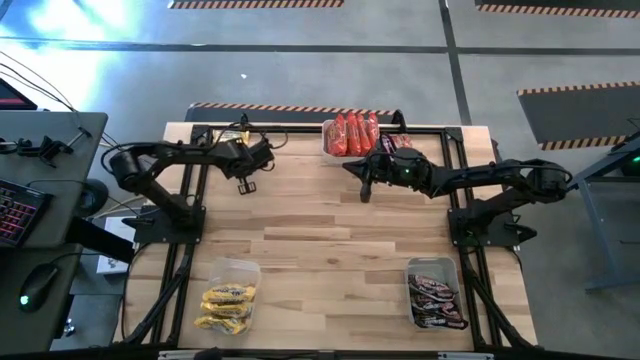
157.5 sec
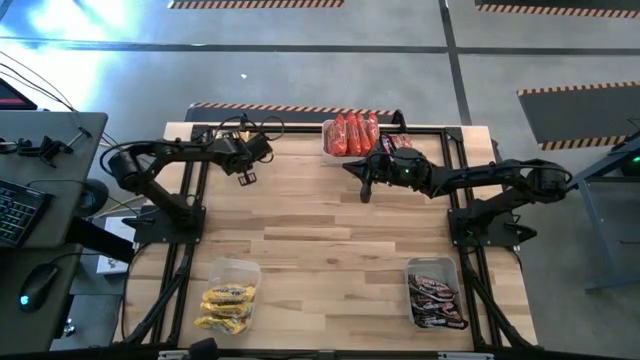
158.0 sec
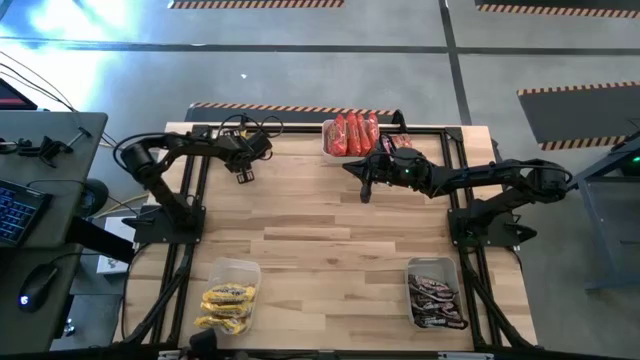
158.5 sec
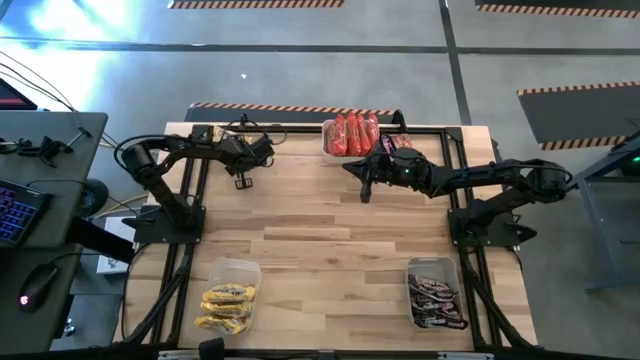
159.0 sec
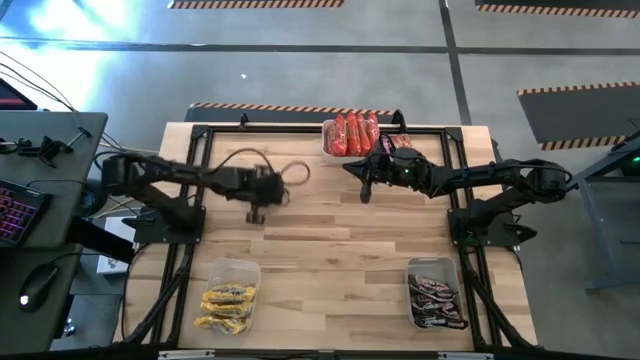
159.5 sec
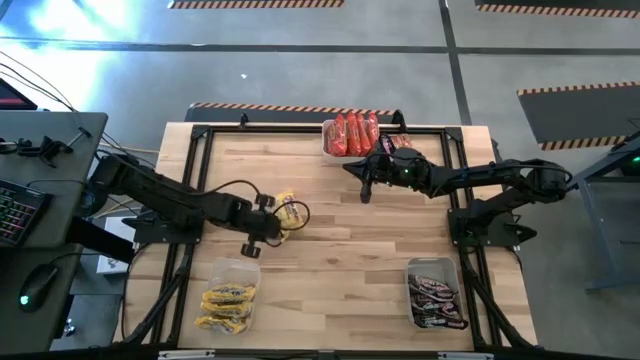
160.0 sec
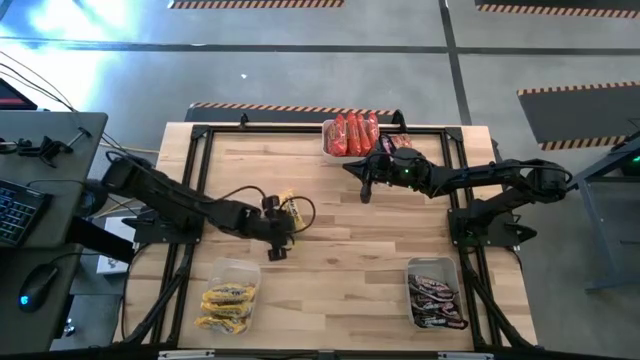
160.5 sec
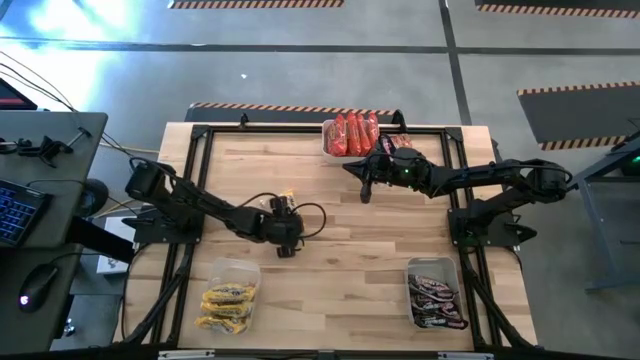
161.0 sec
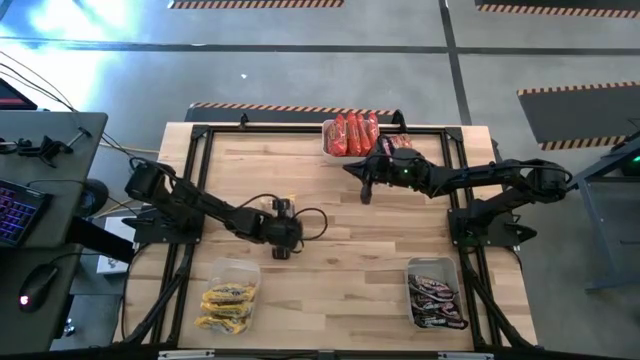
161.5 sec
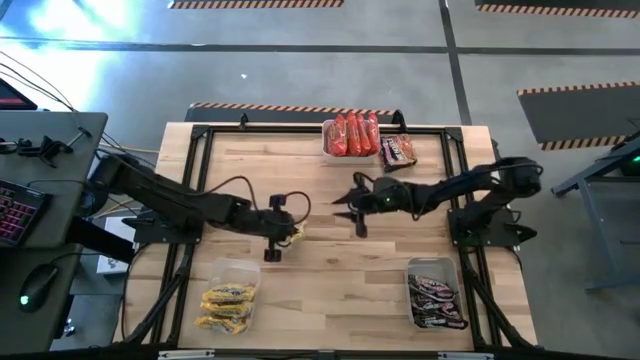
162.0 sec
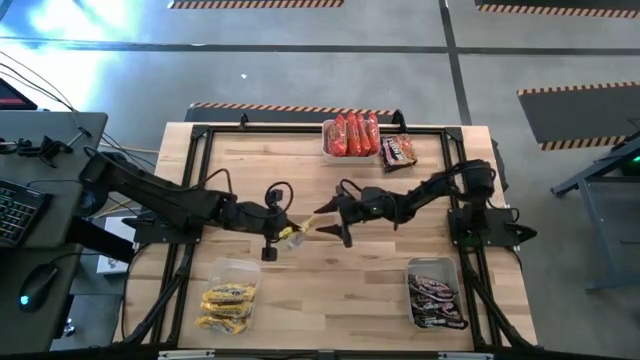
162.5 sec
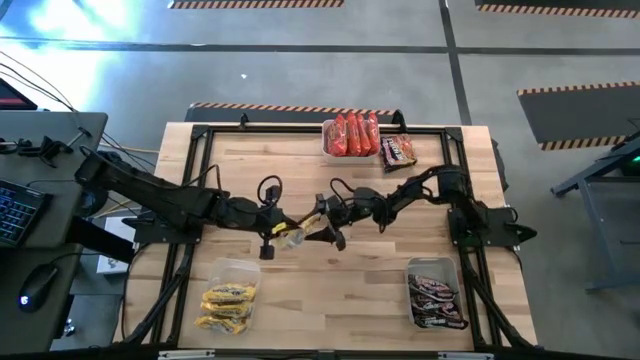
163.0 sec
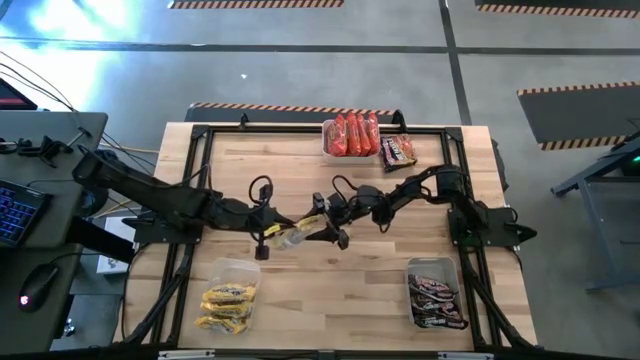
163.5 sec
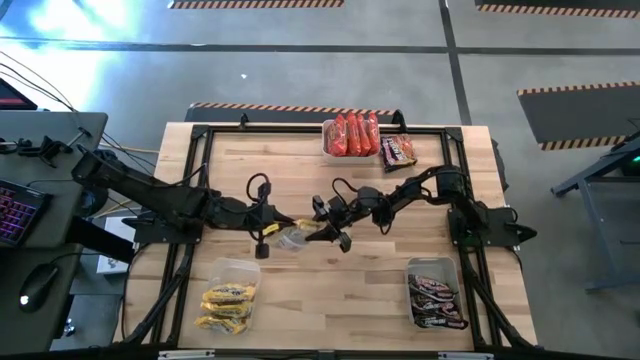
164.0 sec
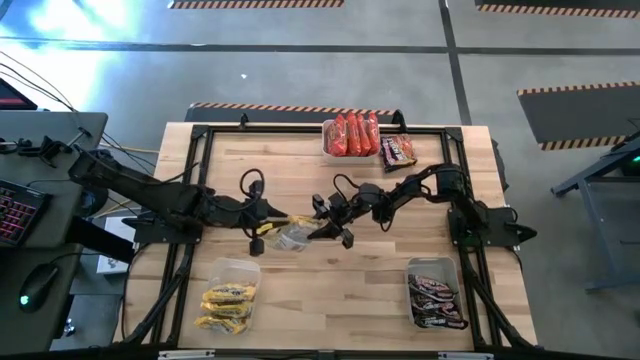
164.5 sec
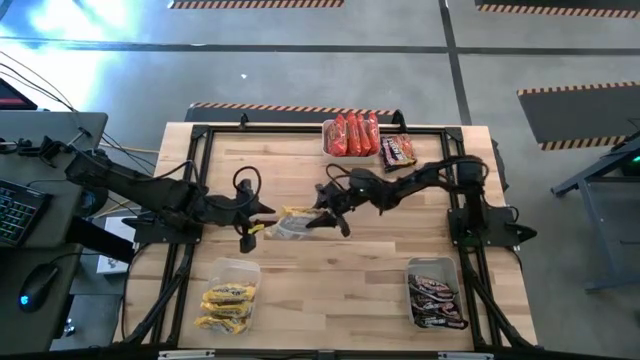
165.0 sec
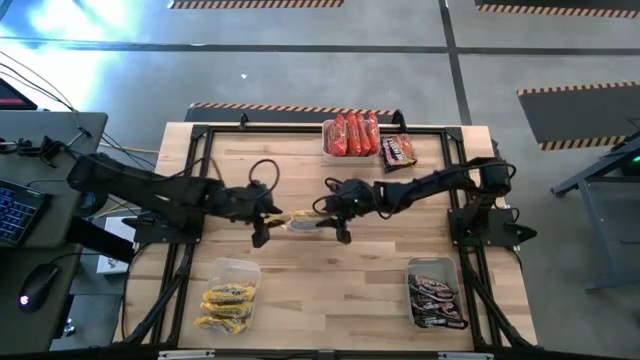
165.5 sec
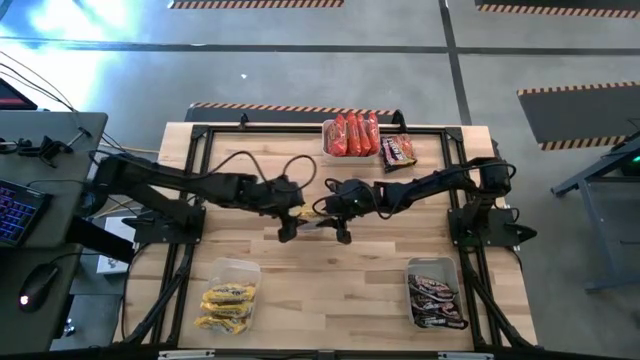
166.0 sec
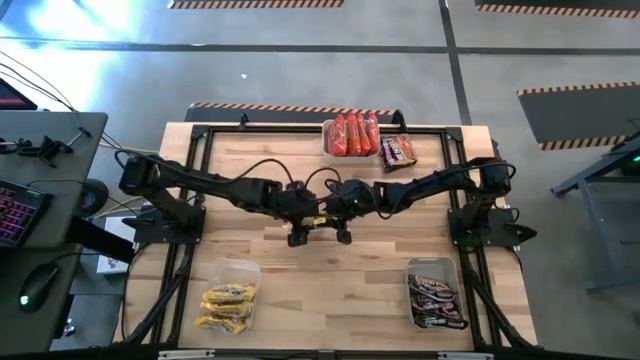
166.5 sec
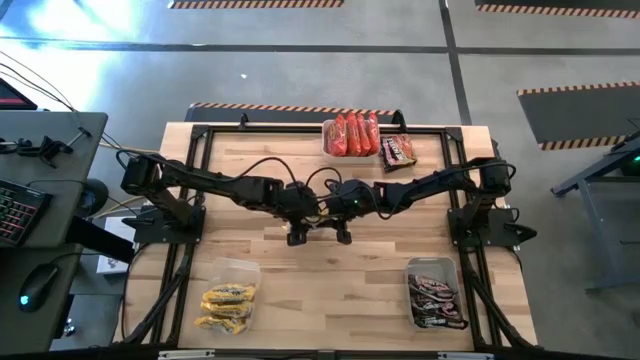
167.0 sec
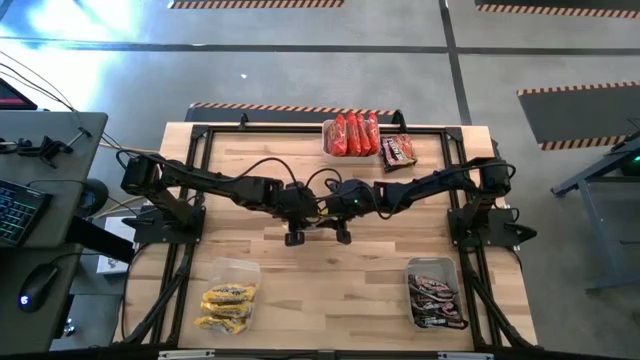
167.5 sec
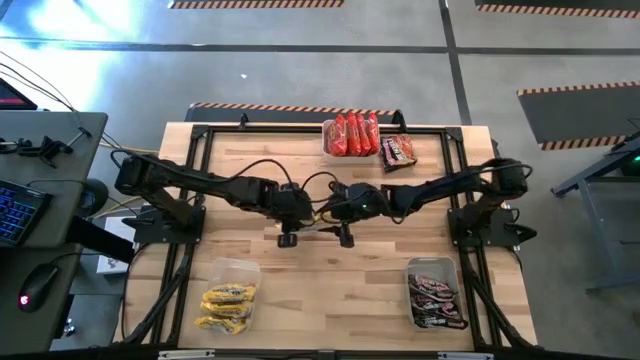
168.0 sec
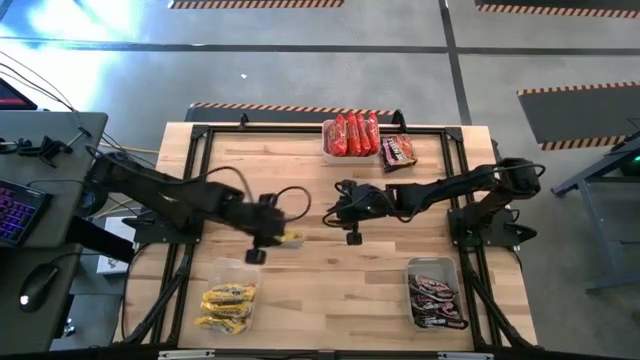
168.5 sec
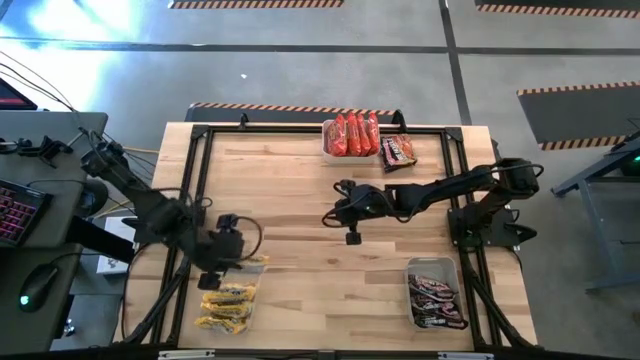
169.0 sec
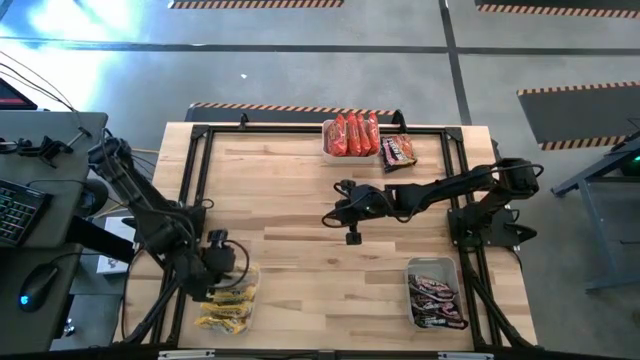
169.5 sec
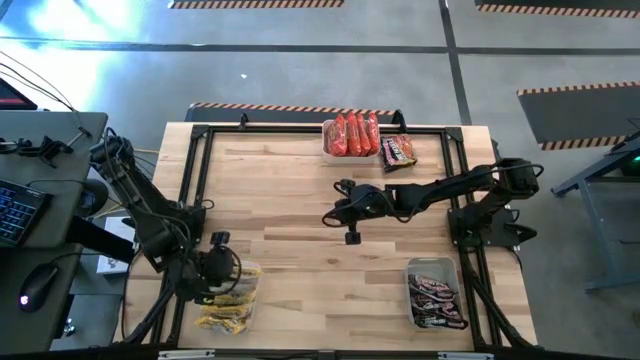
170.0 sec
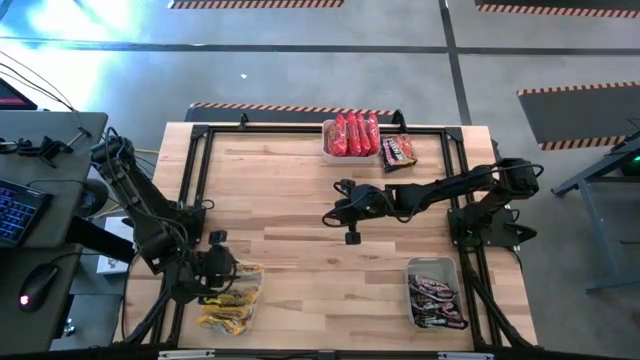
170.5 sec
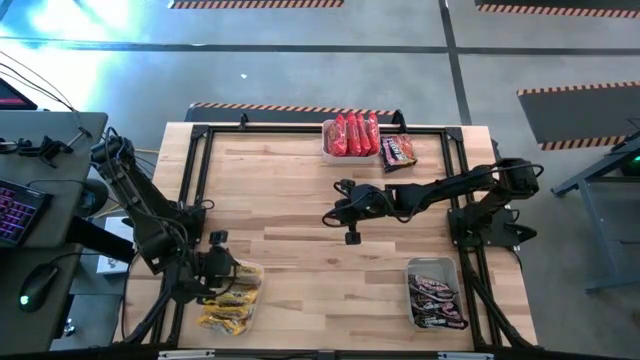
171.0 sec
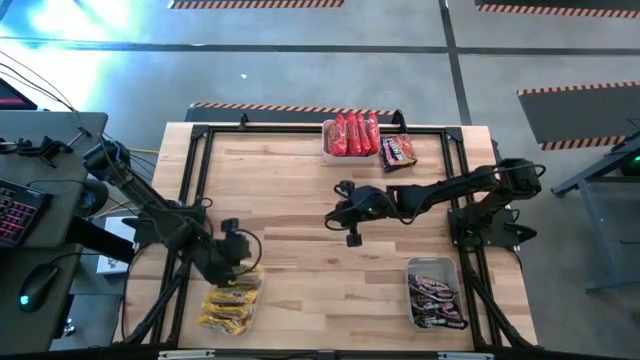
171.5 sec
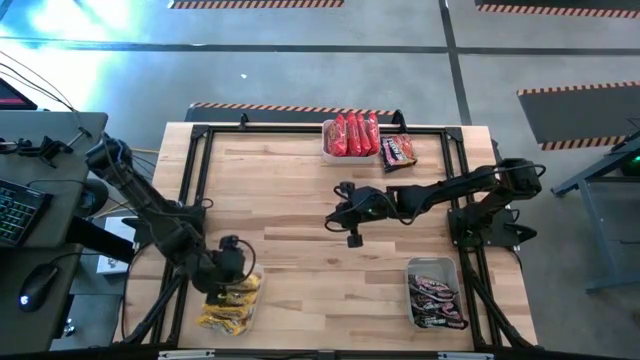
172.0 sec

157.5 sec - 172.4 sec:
Task: Sort Maruchan noodles
Put the yellow noodle pack into the transparent bin

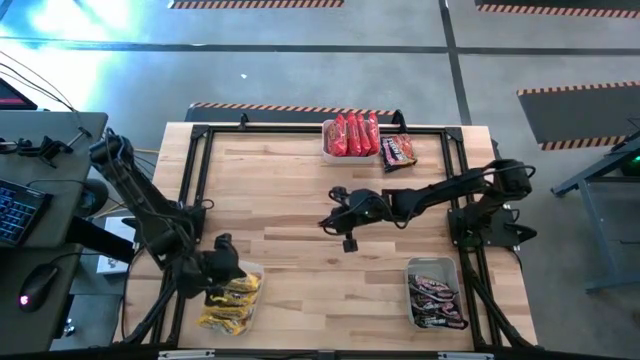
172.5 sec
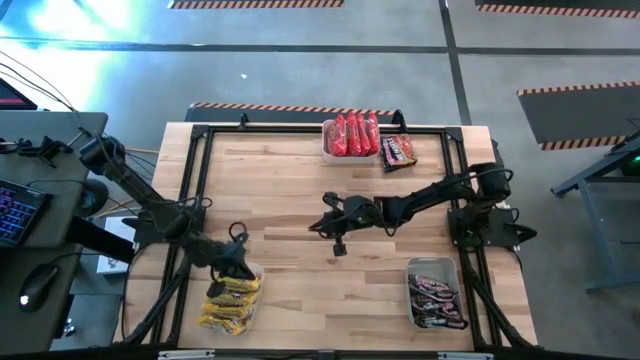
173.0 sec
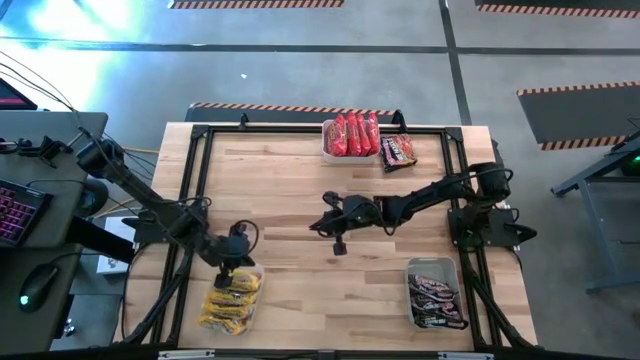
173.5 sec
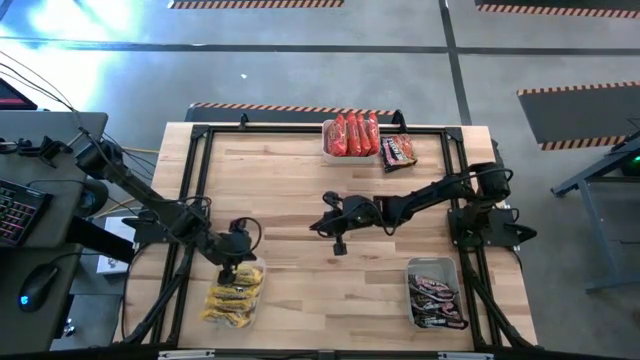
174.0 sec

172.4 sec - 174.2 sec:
Adjust the transparent bin on the table

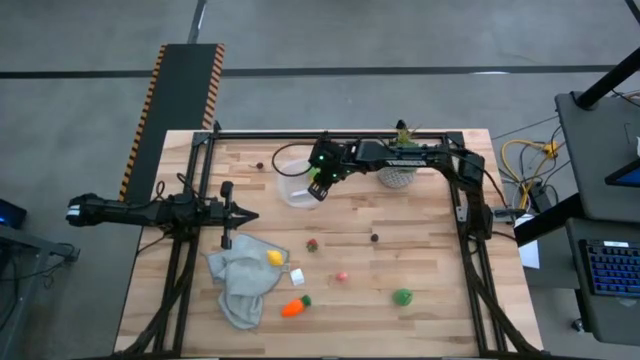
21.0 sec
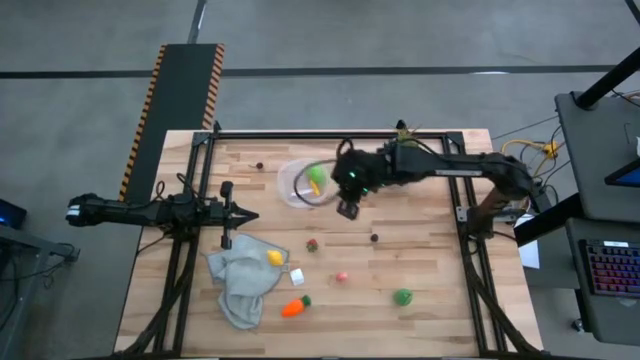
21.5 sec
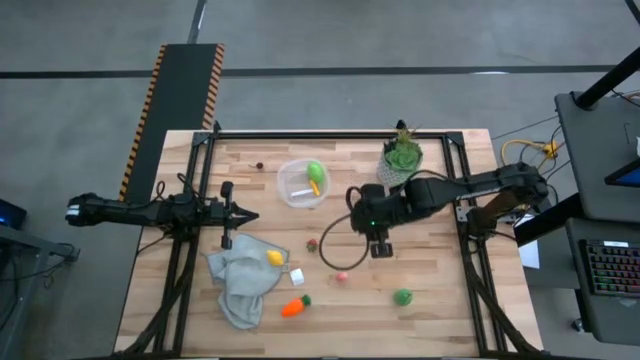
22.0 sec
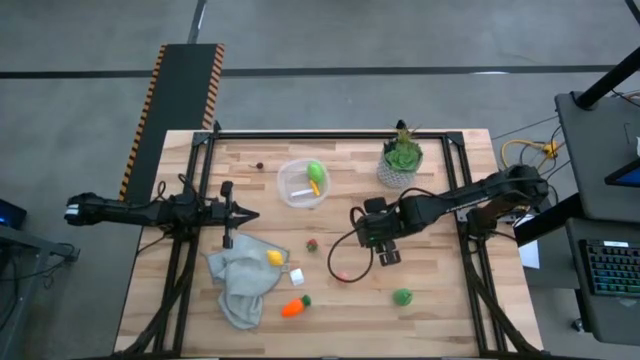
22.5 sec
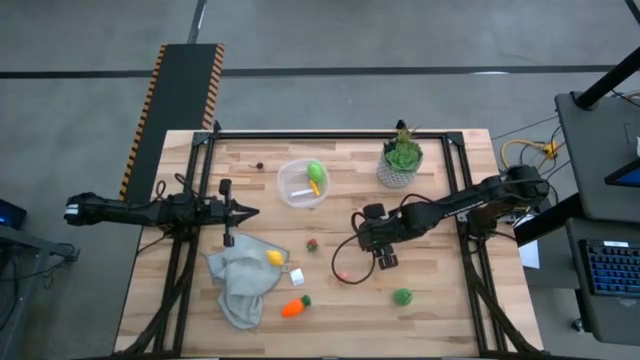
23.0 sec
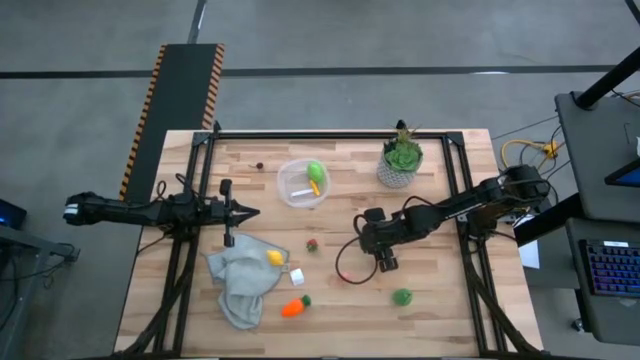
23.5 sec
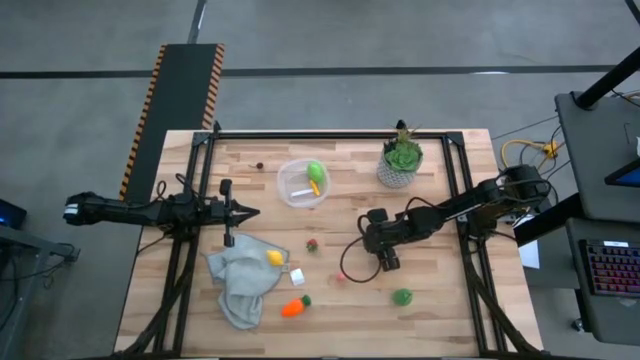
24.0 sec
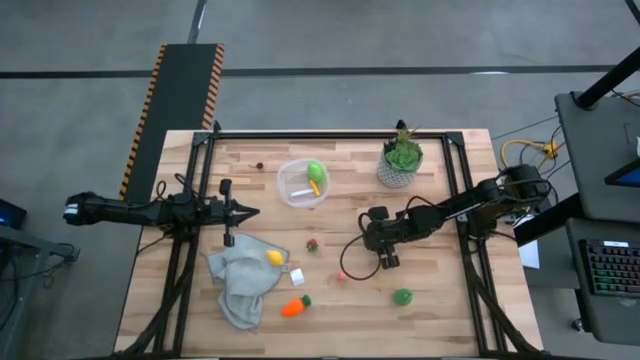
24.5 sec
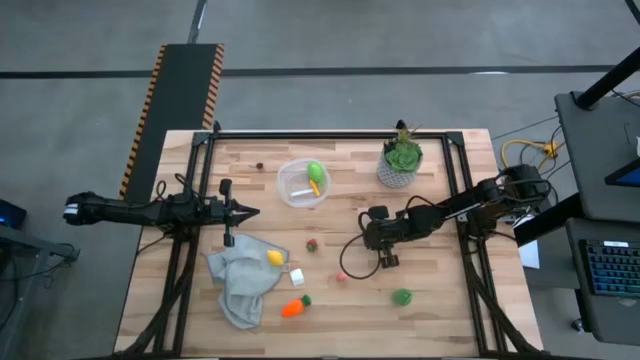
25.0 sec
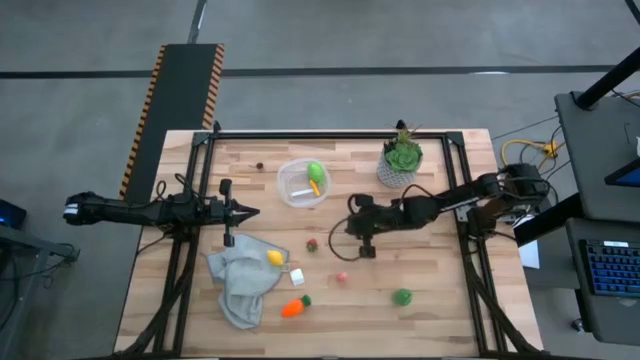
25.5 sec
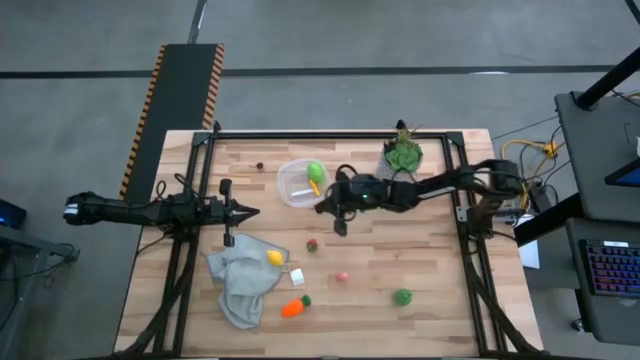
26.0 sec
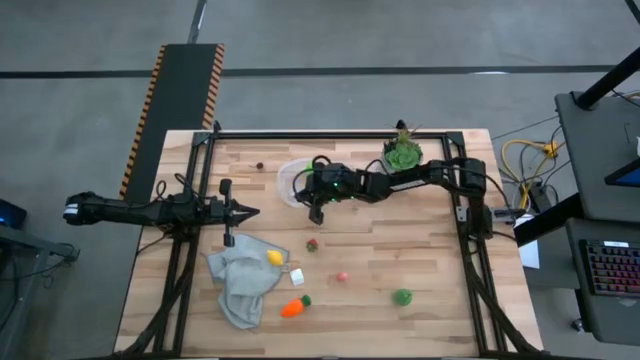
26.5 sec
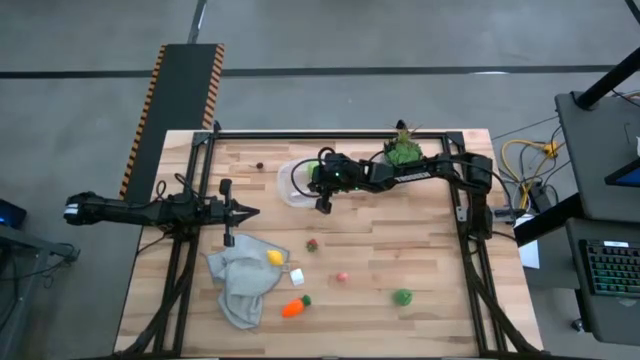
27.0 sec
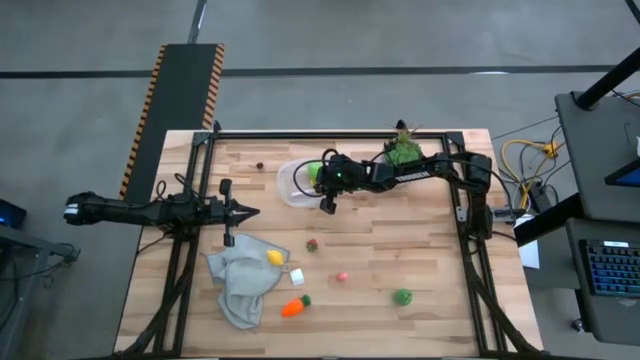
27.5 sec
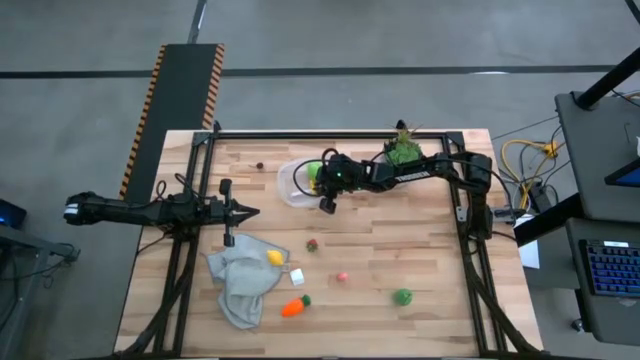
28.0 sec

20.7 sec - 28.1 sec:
Task: Pick and placing Produce into tupperware
Put the dark purple cherry into the transparent bin
